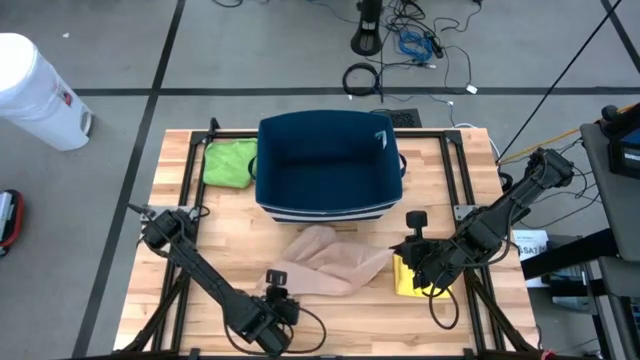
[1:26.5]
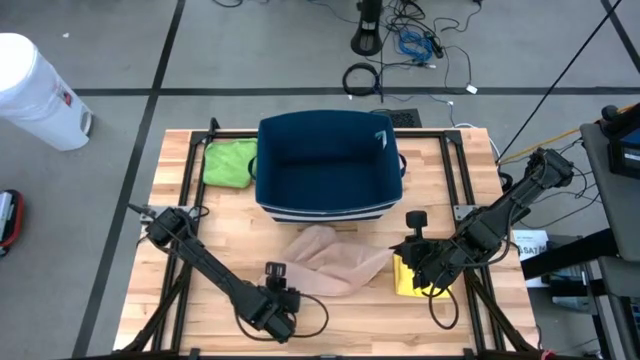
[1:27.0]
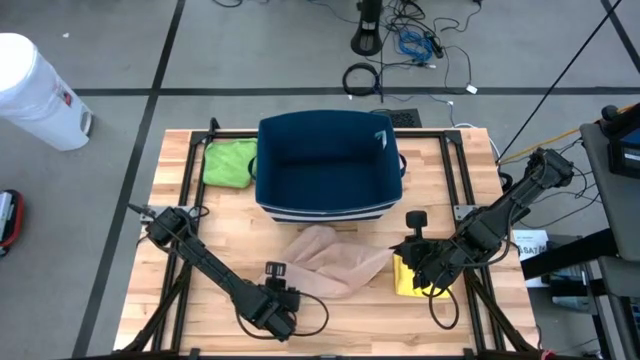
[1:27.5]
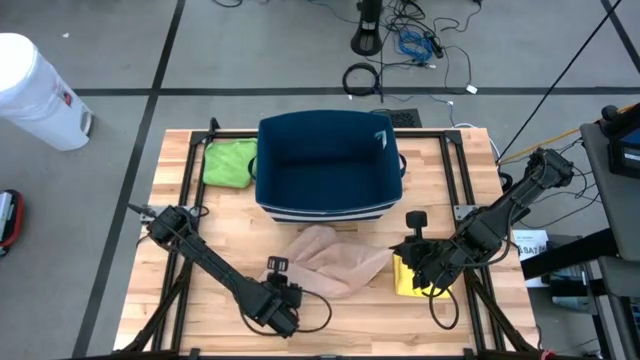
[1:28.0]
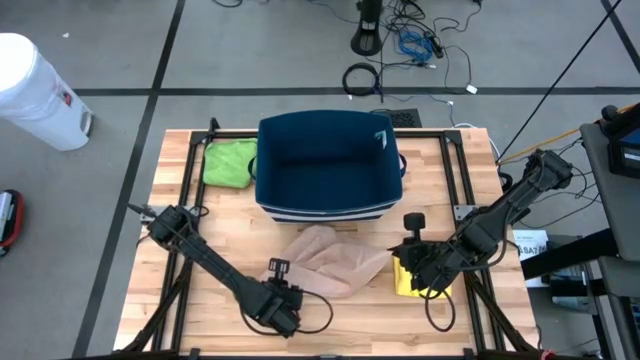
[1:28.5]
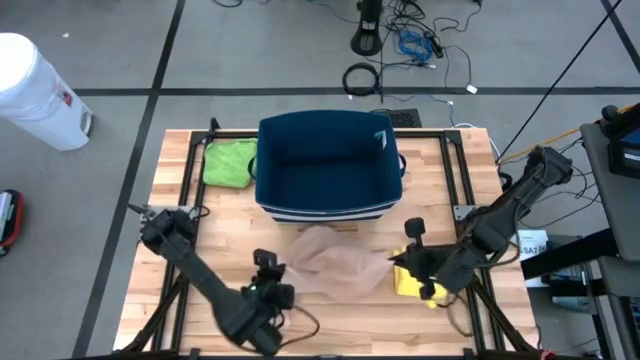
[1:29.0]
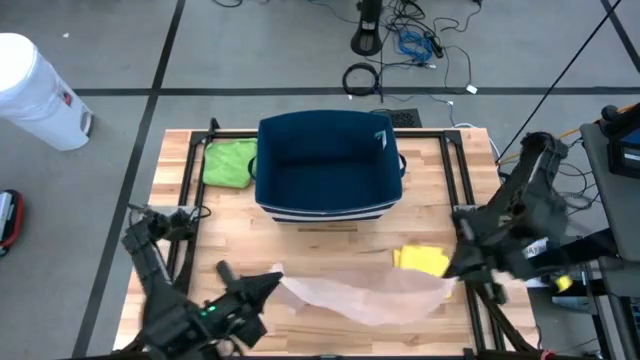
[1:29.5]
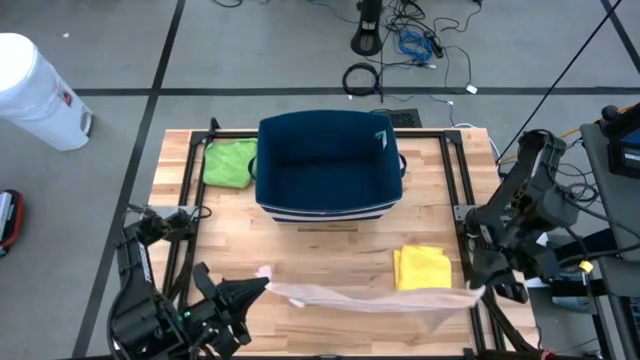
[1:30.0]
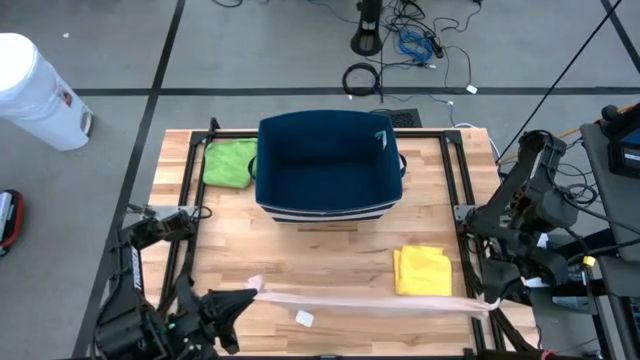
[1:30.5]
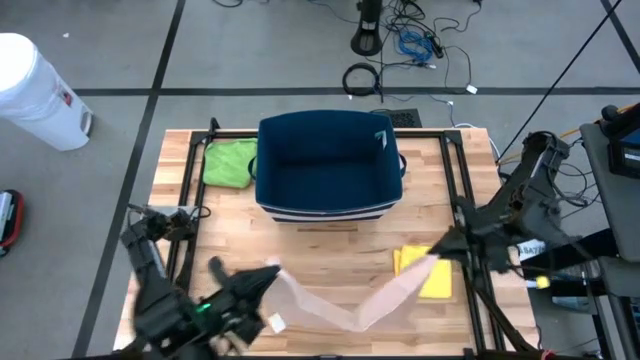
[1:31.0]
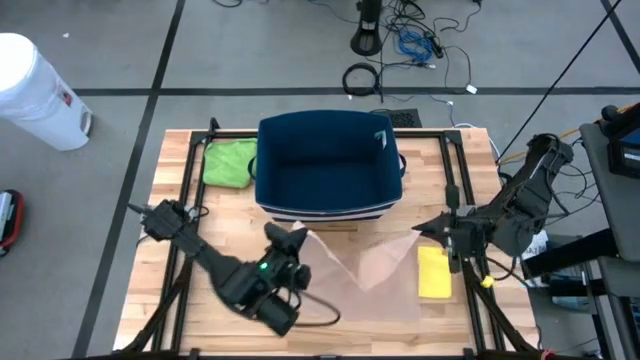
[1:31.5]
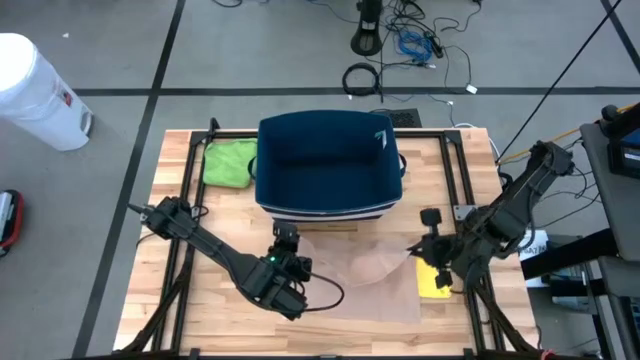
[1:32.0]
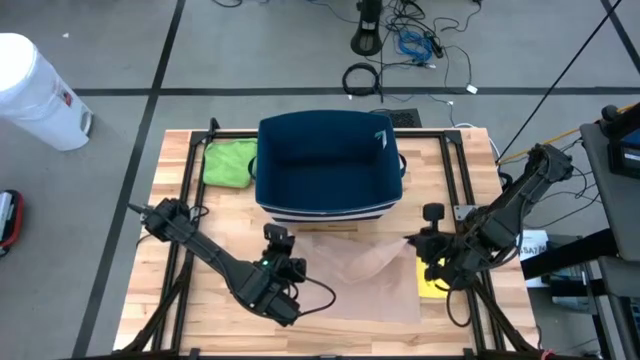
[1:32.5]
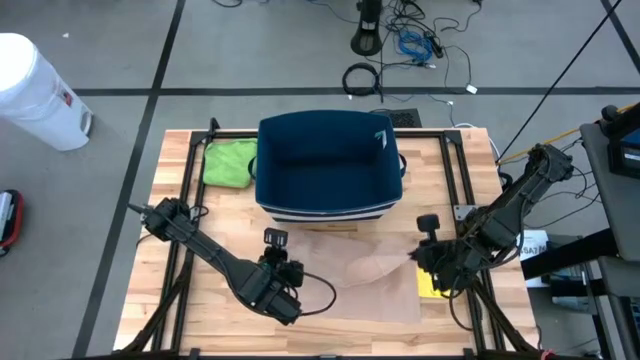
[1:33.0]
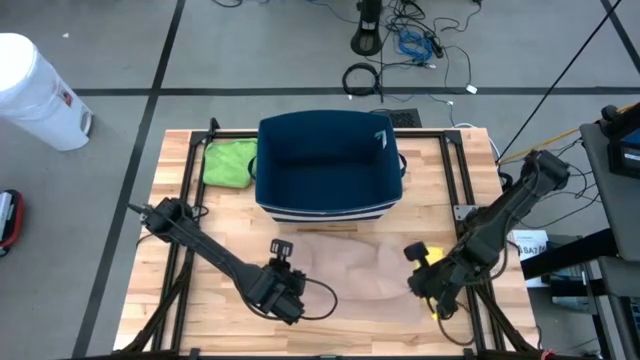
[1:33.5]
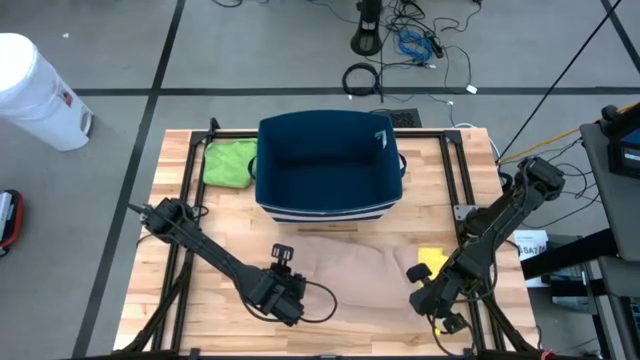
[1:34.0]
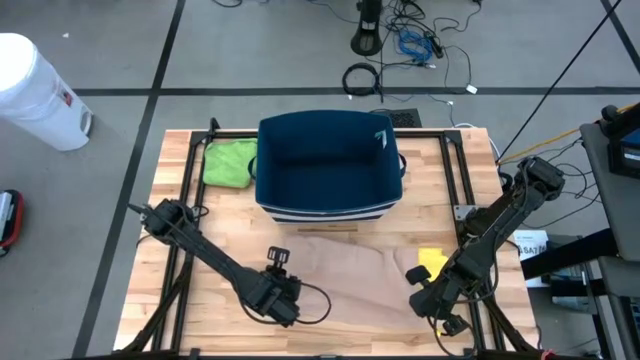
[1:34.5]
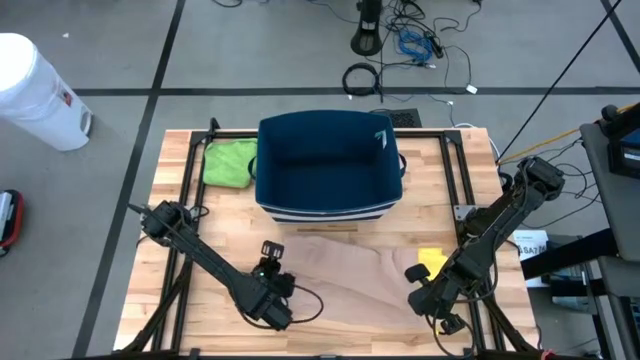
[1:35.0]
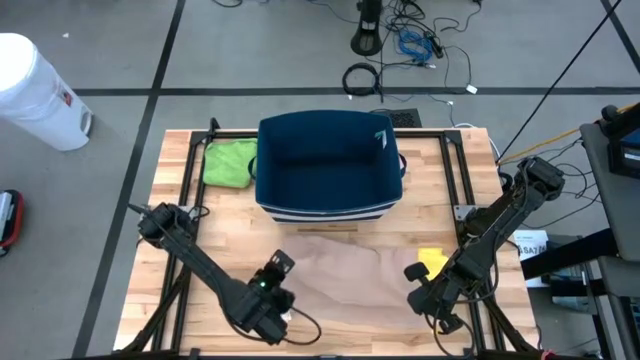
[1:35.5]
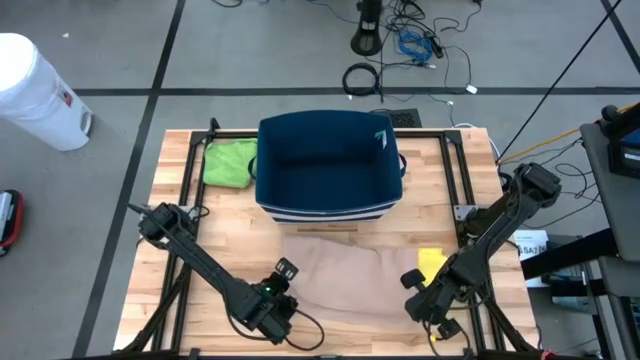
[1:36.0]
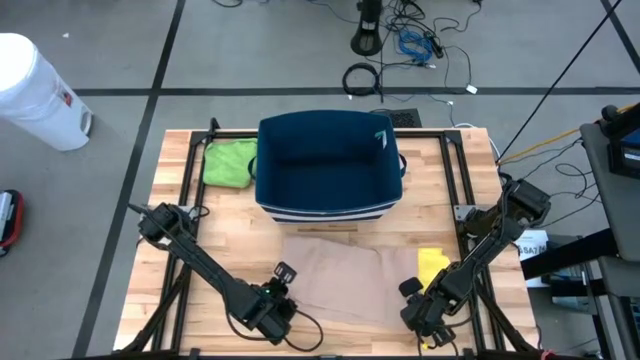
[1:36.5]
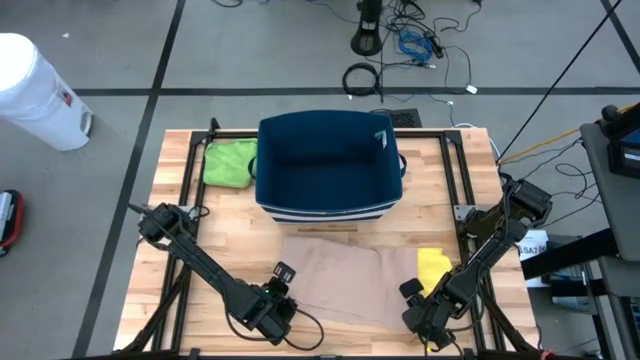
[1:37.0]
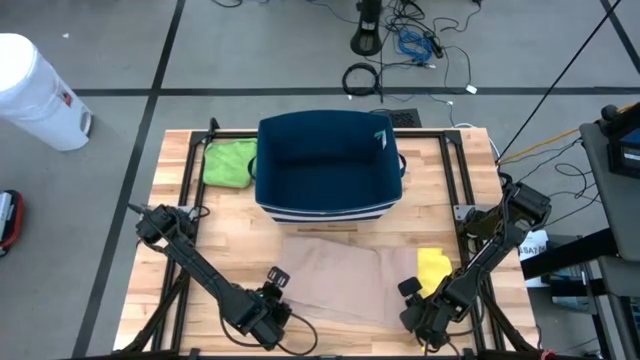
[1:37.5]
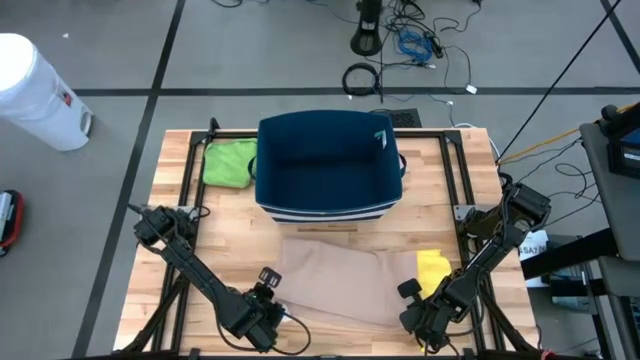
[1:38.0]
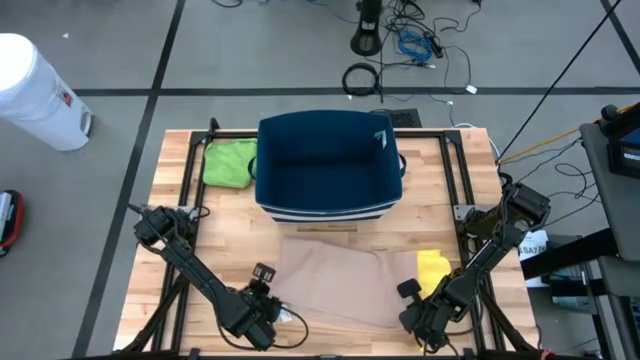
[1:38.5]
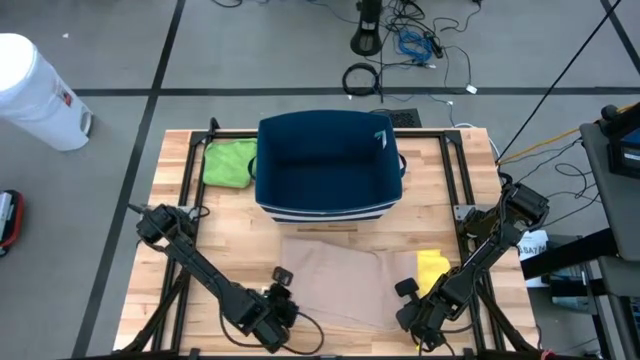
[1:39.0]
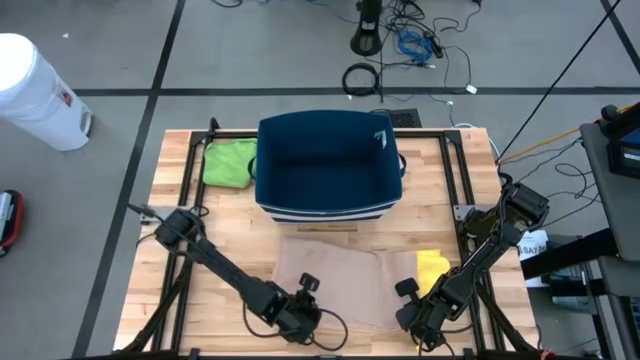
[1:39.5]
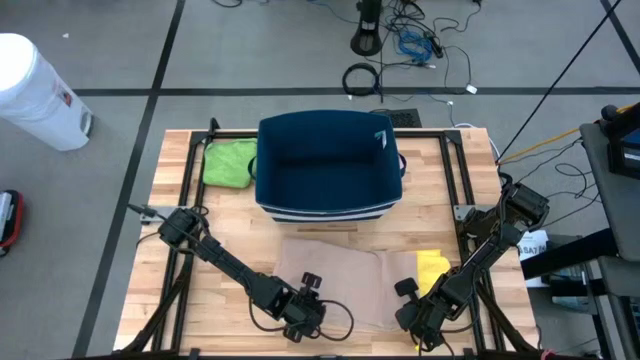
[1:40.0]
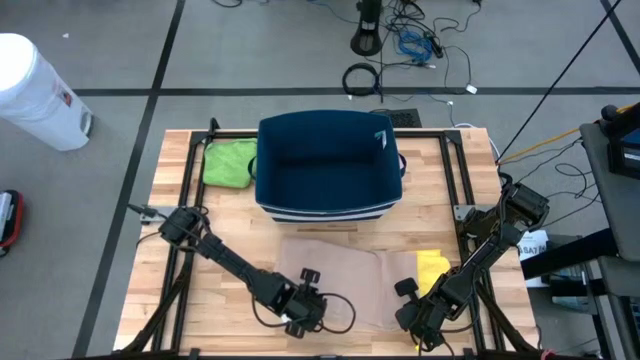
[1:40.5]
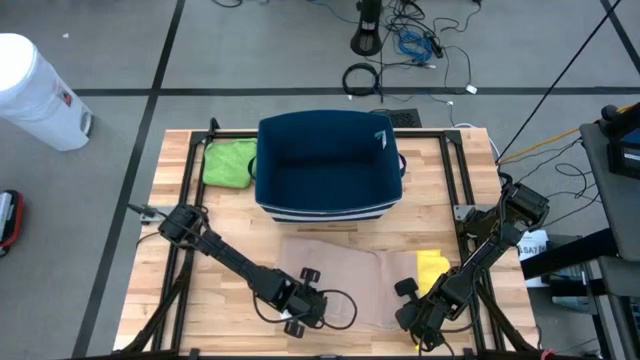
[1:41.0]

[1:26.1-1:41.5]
Task: Fold towel
Fold the light brown towel

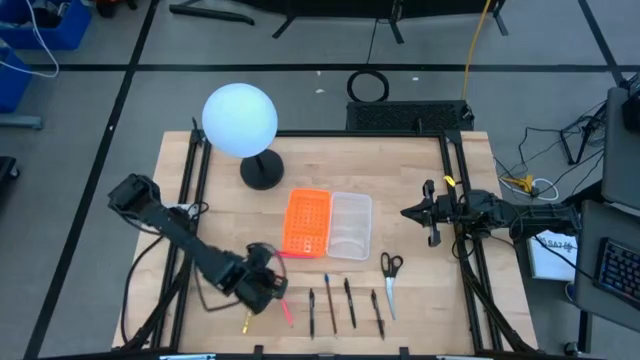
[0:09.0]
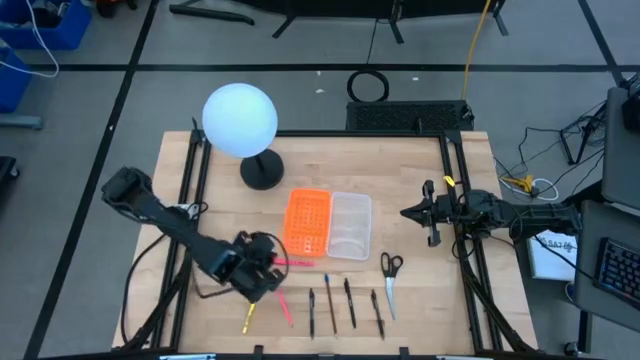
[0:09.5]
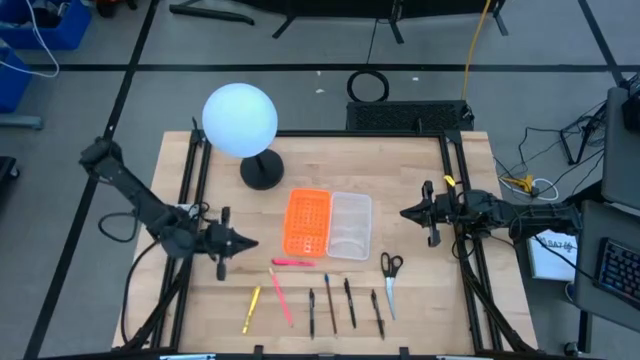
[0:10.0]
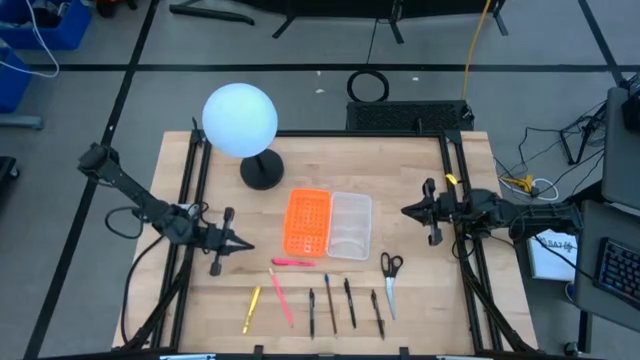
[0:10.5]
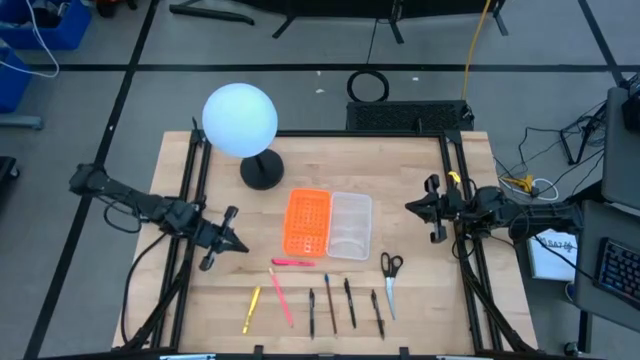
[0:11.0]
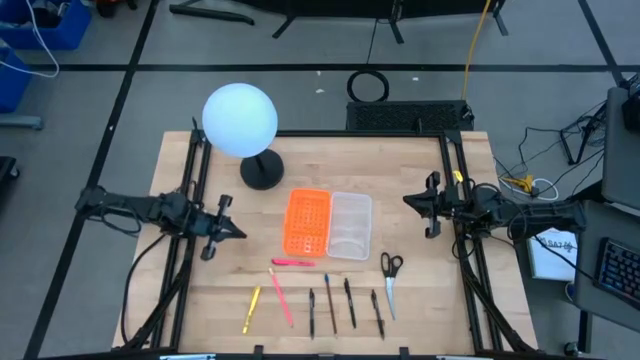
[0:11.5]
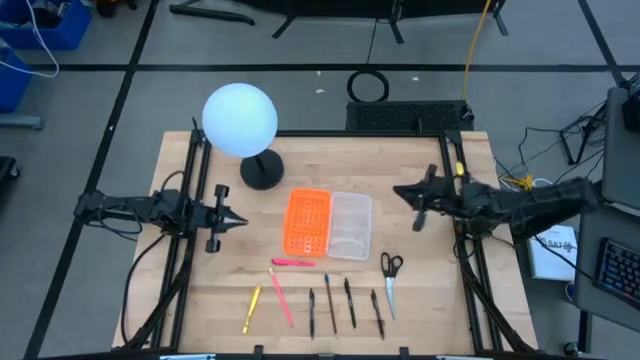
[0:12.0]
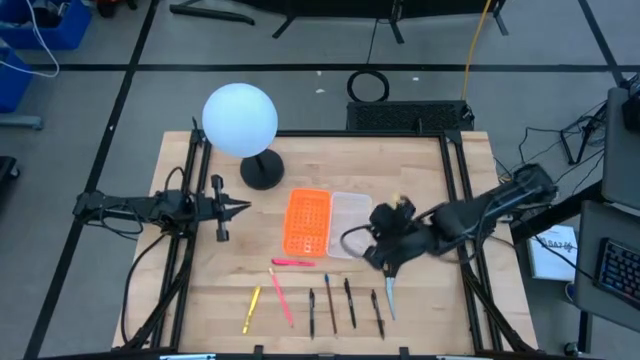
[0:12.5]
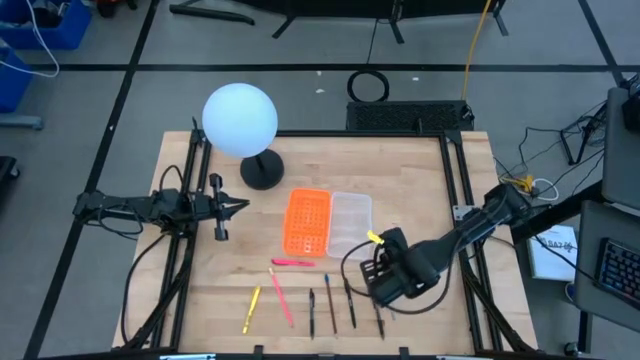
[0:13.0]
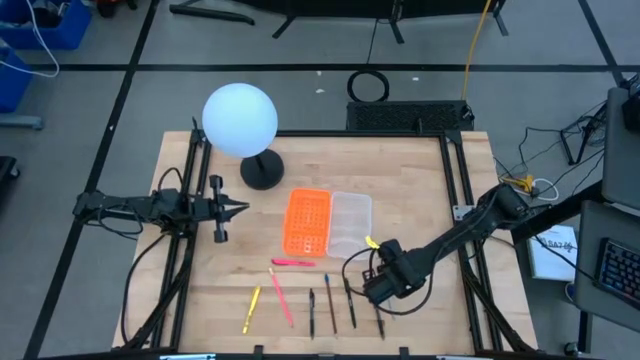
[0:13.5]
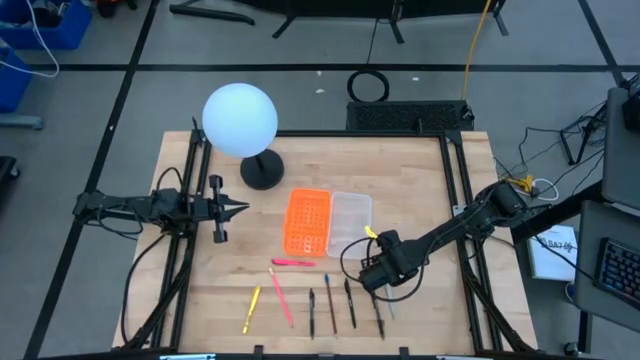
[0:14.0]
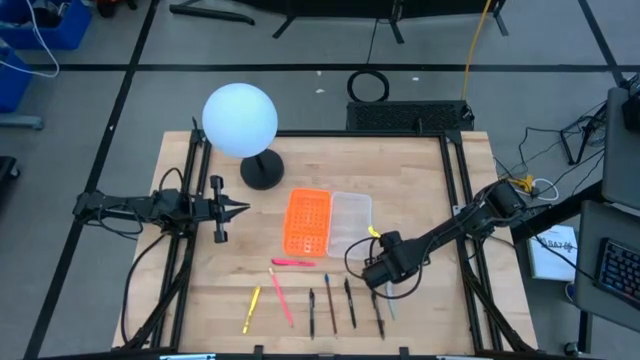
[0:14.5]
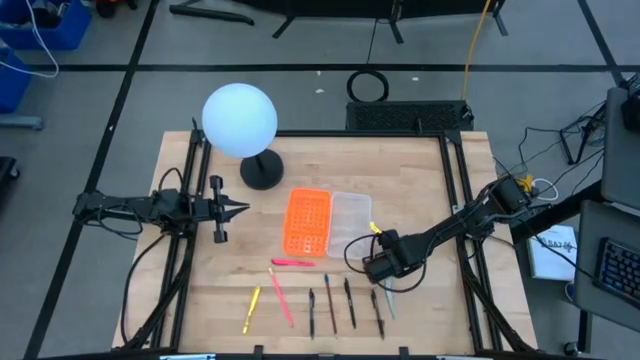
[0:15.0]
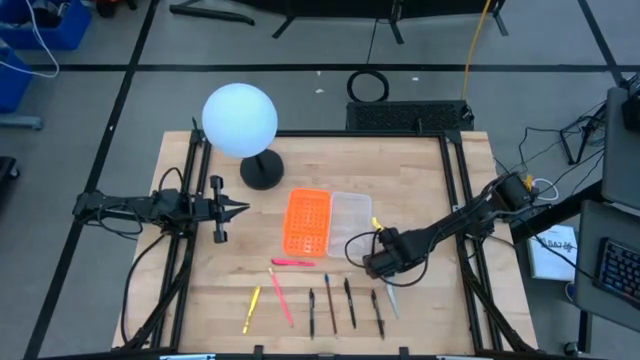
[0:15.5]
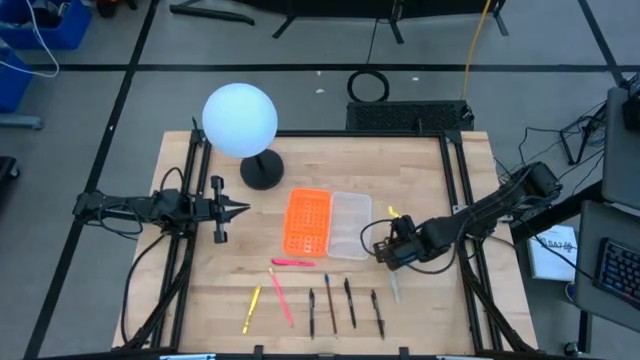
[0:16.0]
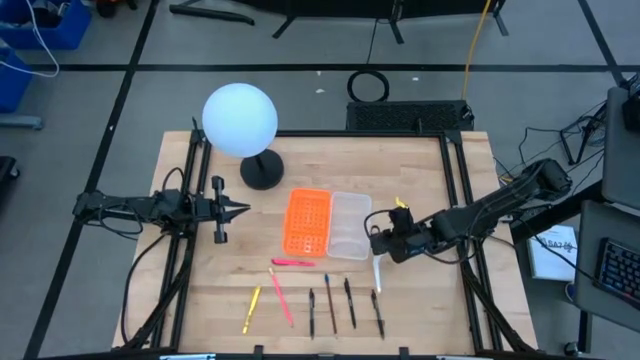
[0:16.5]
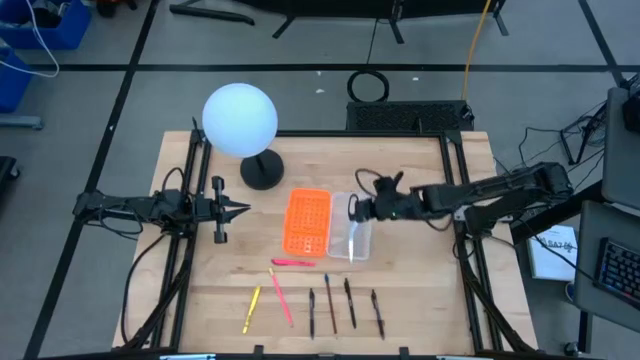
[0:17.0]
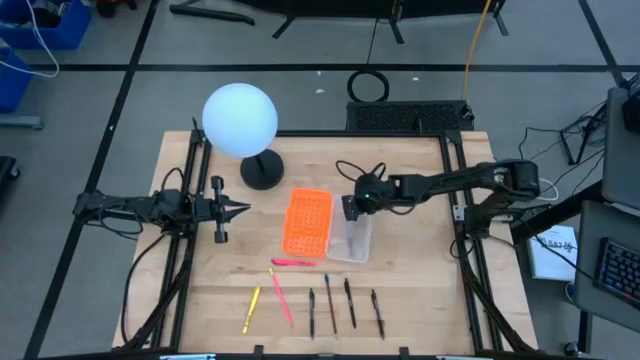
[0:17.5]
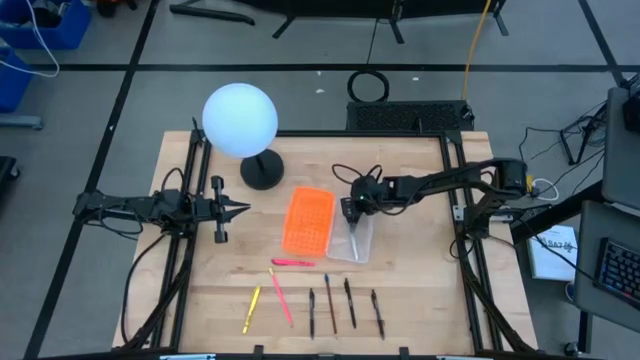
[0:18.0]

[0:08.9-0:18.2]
Task: Pick & place school supplies into a supply box
Put the black scissors into the orange supply box
